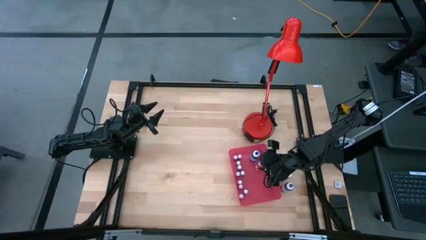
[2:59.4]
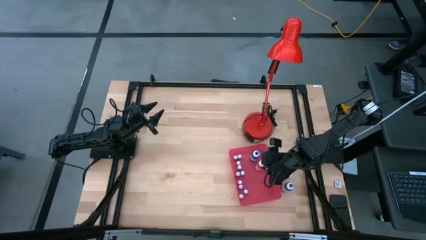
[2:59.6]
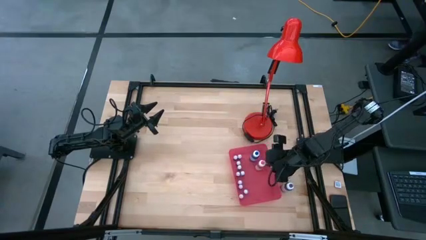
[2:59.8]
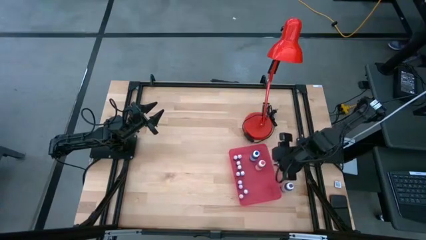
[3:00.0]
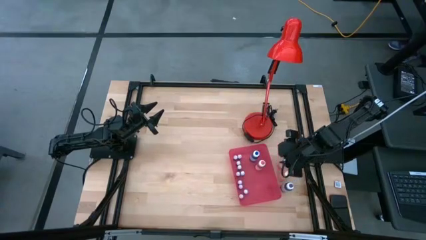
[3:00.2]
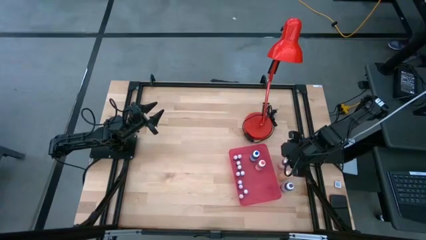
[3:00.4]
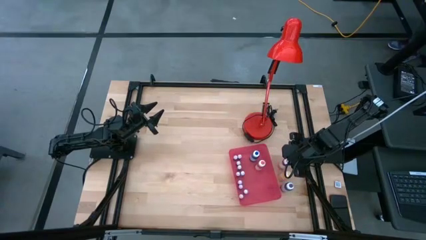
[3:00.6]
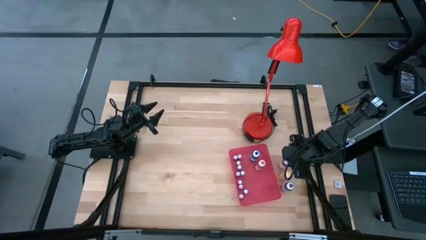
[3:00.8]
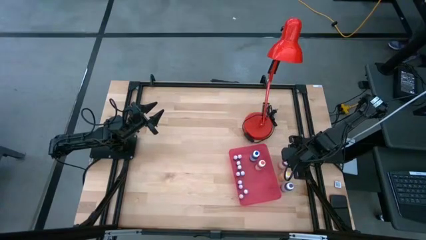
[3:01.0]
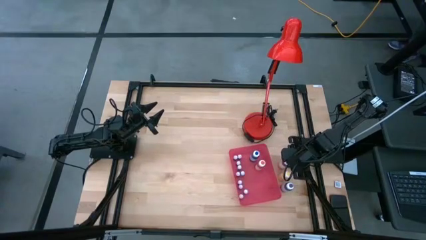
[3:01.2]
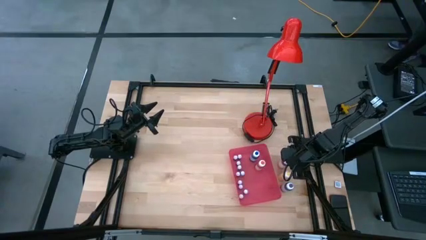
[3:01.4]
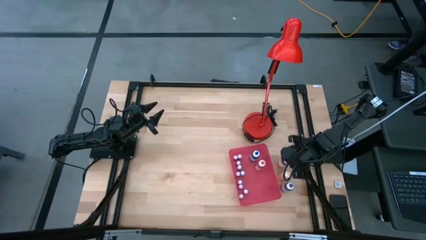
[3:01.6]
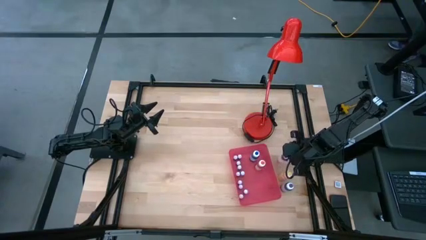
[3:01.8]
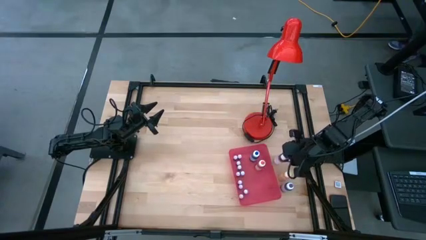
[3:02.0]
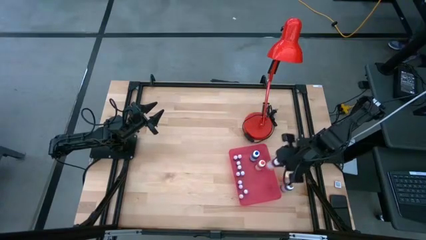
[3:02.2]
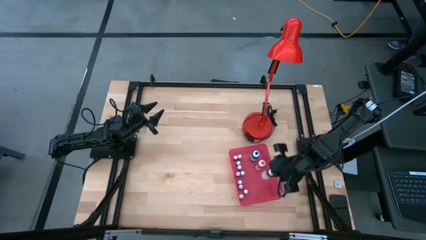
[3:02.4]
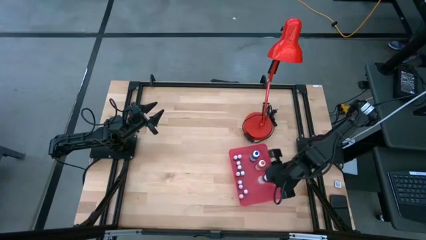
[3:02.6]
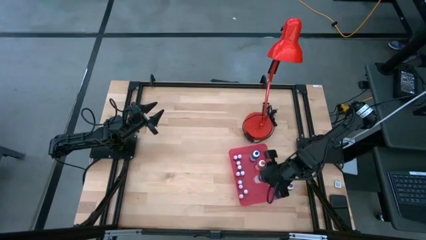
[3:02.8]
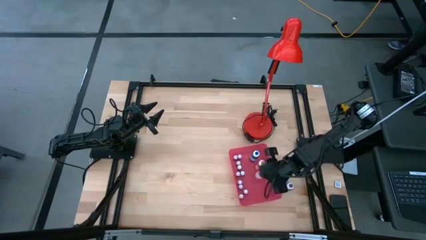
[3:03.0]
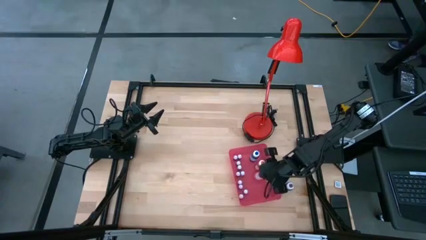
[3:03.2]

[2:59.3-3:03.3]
Task: Pick & Place food coloring
Put the large pink food coloring bottle into the red bin

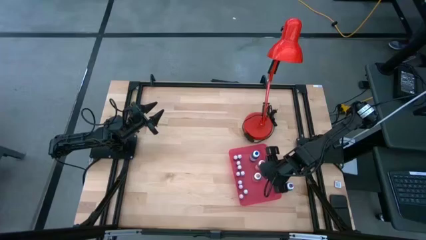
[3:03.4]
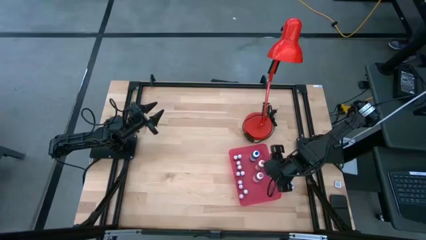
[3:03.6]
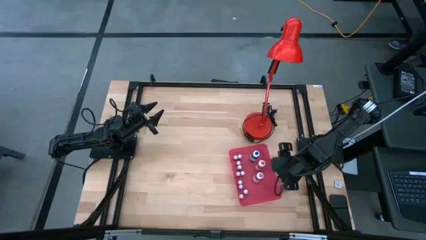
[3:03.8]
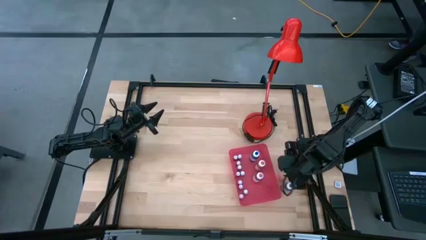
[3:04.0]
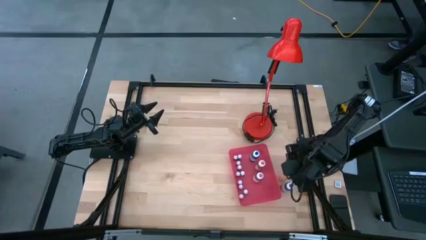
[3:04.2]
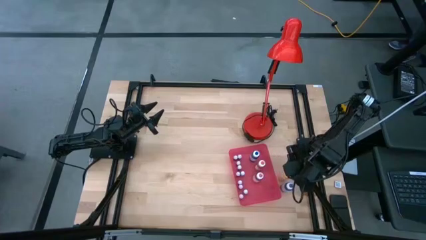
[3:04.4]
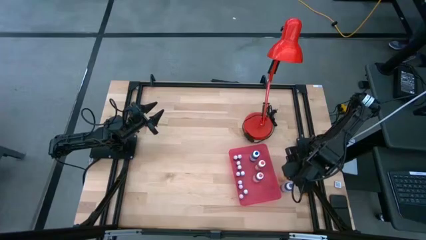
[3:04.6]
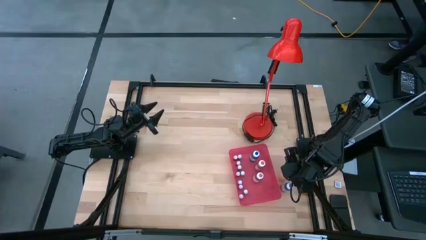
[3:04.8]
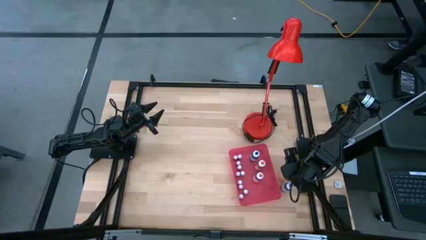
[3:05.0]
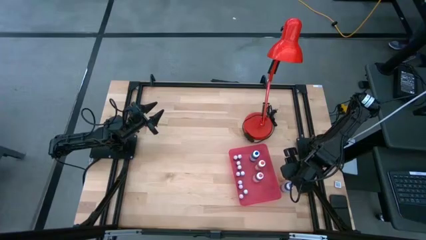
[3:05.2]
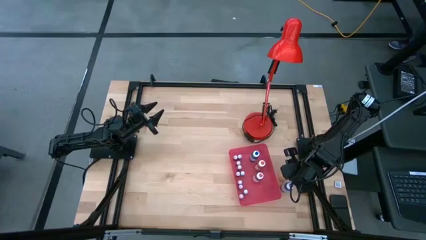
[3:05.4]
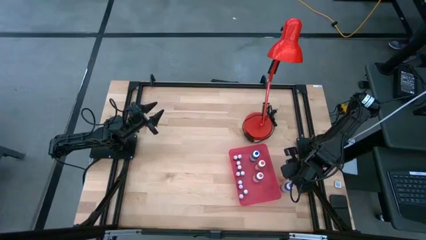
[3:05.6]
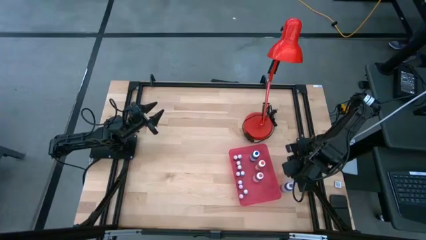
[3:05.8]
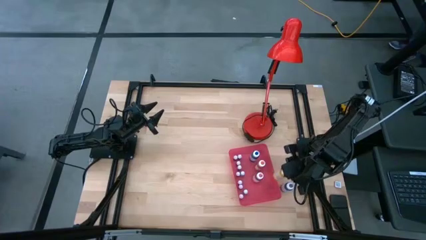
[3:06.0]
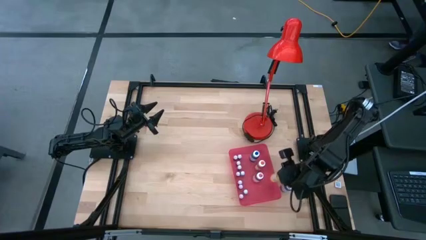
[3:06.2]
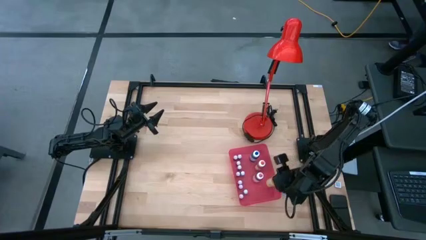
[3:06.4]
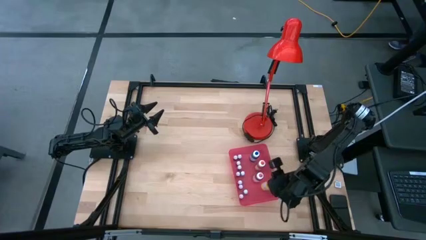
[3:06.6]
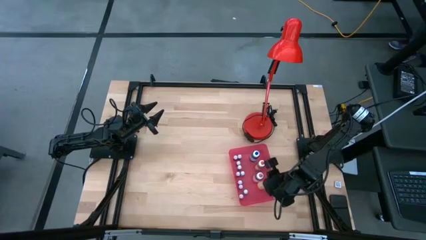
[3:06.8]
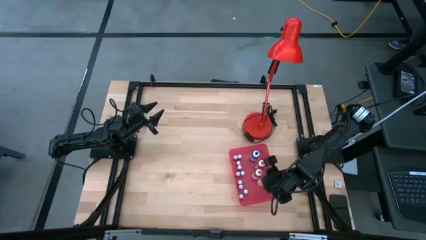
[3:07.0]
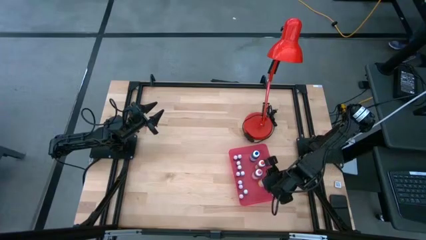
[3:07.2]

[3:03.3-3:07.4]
Put the large yellow food coloring bottle into the red bin

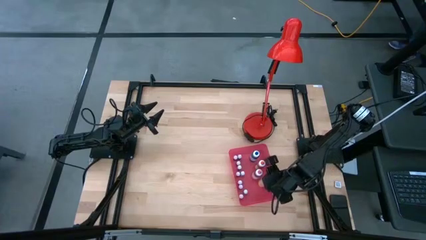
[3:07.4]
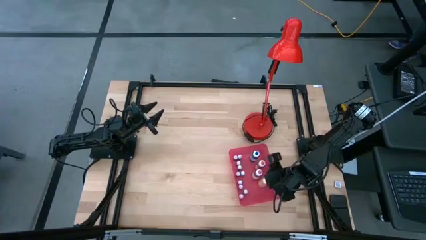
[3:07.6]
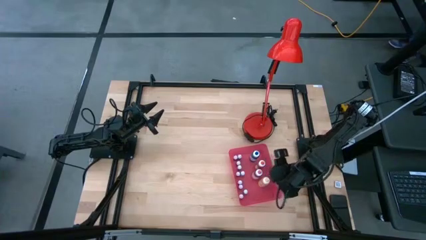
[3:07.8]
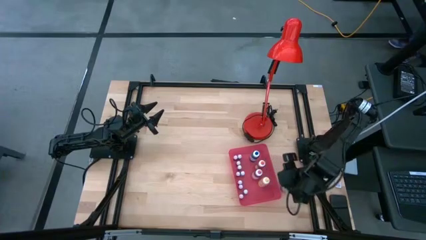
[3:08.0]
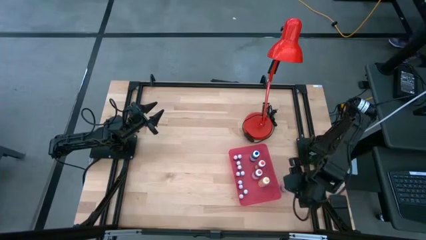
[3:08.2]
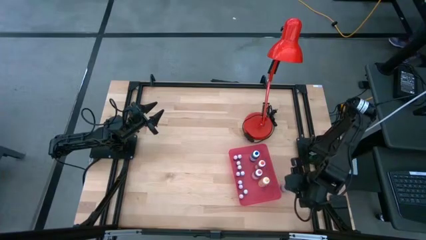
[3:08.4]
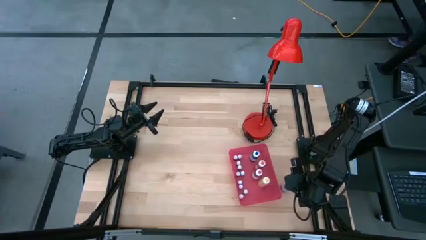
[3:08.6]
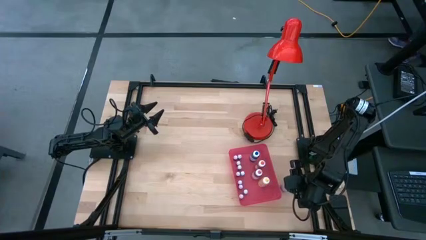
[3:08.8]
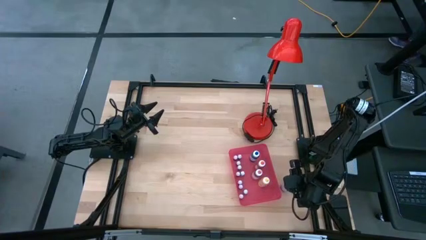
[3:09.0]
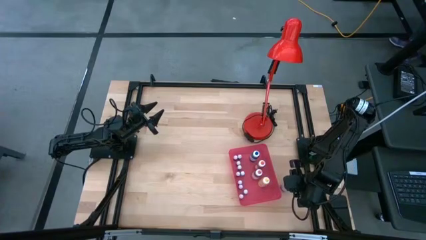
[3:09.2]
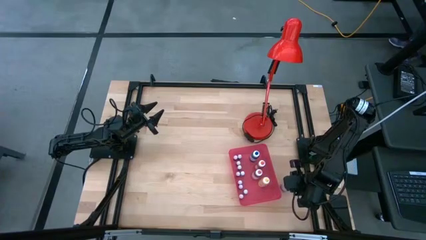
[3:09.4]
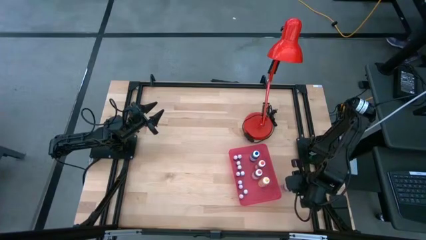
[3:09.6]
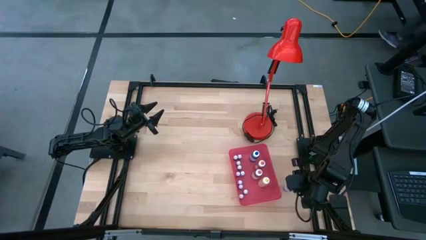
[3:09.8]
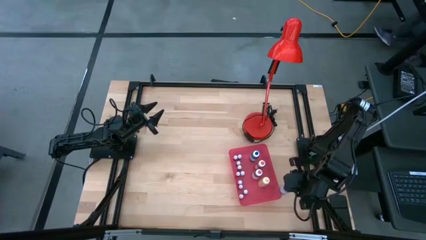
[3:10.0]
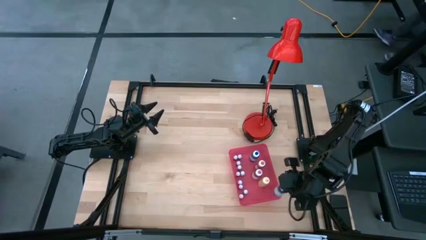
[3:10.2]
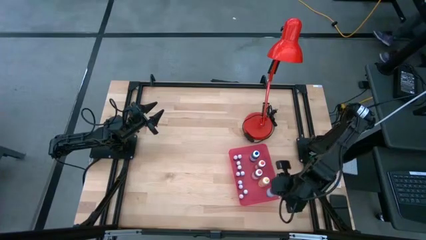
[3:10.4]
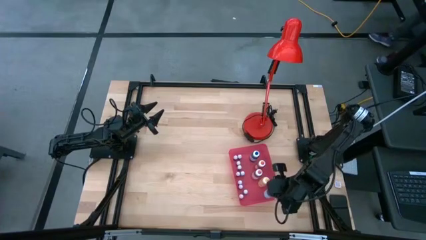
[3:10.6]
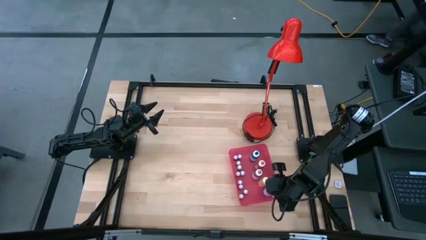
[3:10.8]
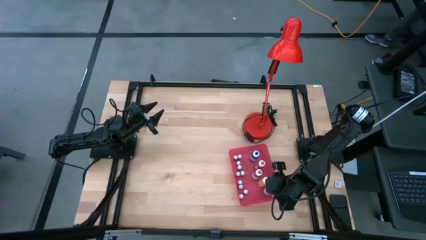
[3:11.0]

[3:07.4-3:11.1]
Put the large purple food coloring bottle into the red bin

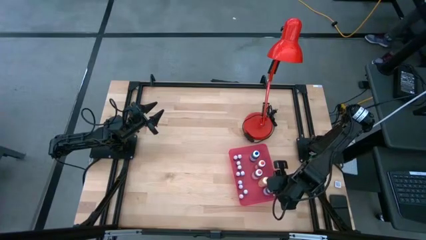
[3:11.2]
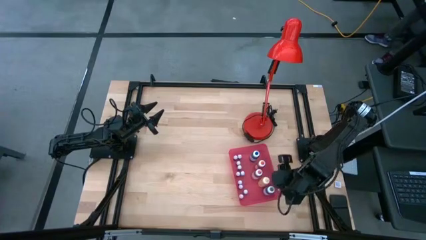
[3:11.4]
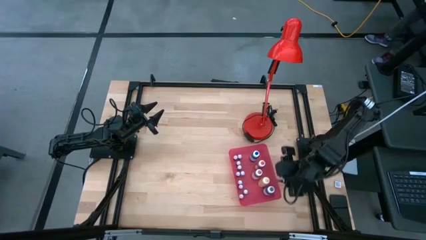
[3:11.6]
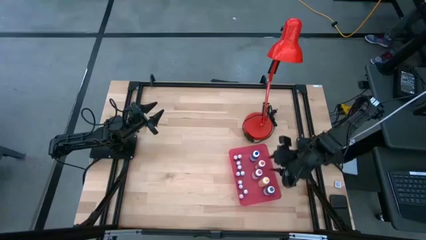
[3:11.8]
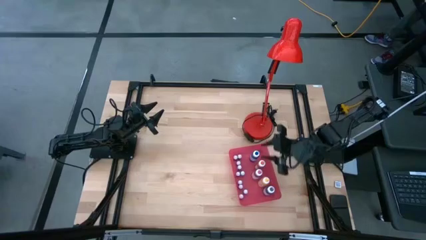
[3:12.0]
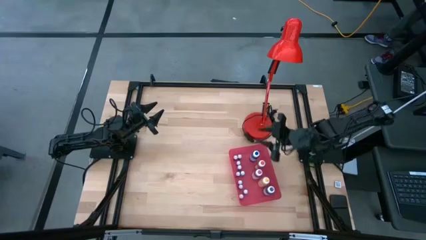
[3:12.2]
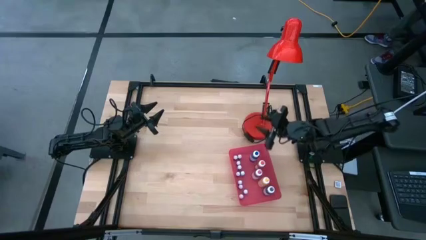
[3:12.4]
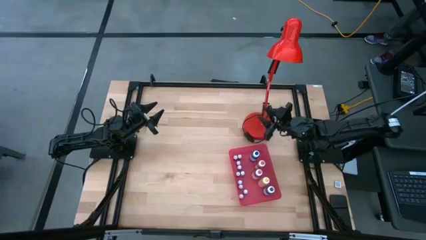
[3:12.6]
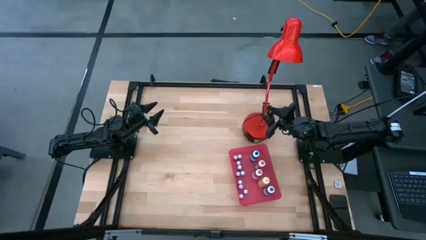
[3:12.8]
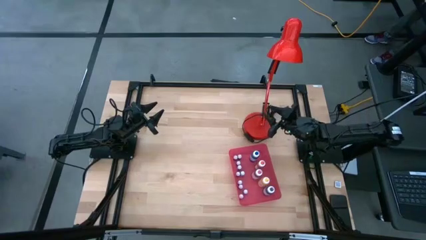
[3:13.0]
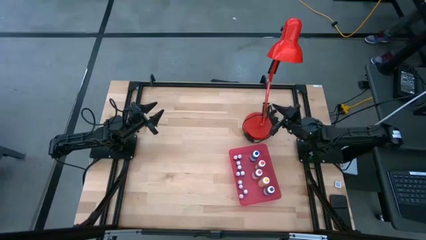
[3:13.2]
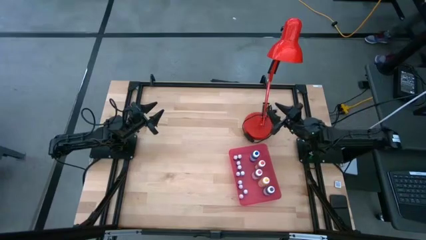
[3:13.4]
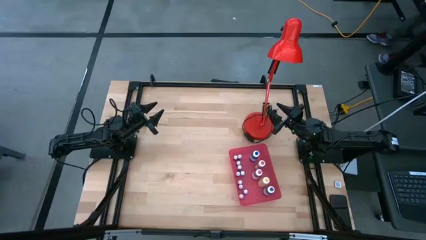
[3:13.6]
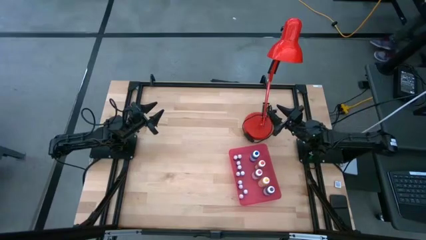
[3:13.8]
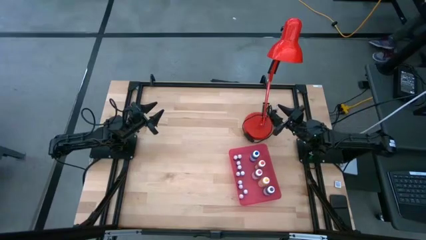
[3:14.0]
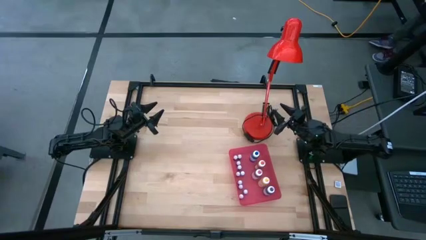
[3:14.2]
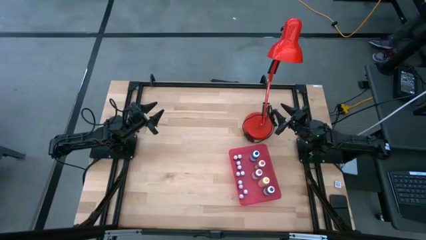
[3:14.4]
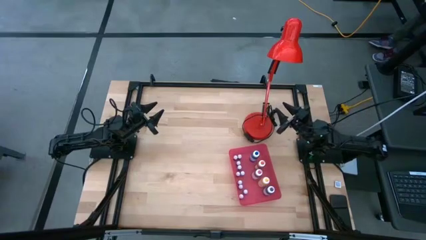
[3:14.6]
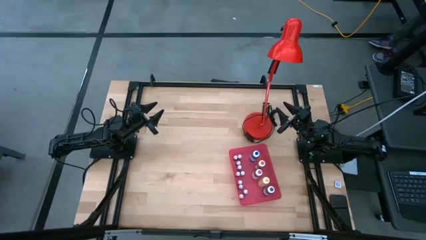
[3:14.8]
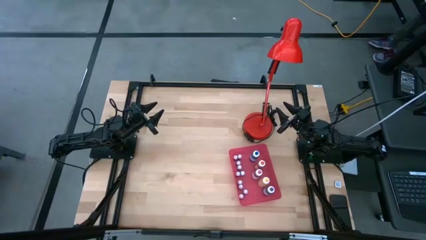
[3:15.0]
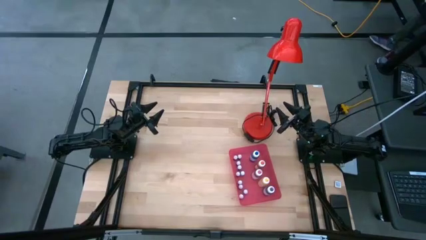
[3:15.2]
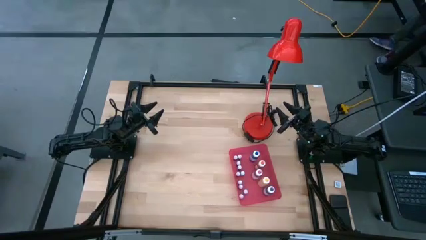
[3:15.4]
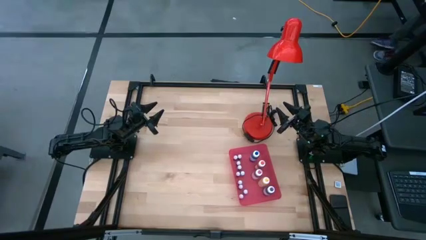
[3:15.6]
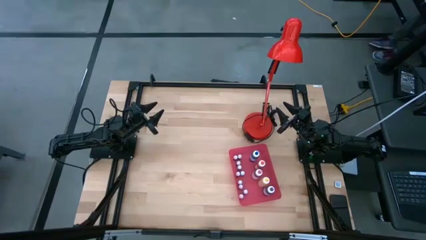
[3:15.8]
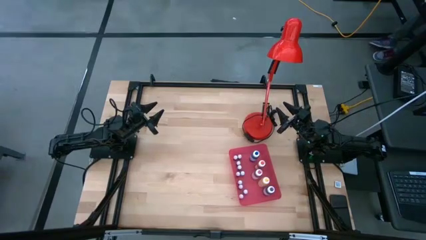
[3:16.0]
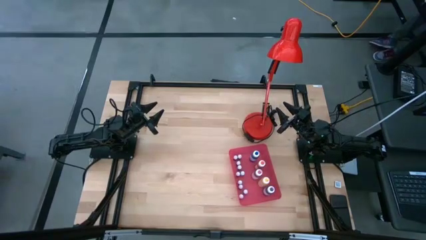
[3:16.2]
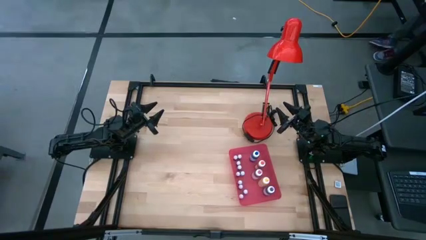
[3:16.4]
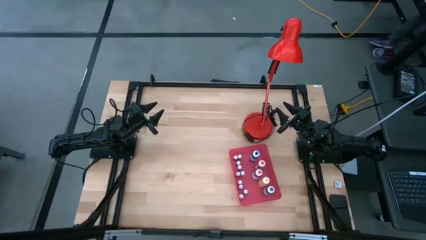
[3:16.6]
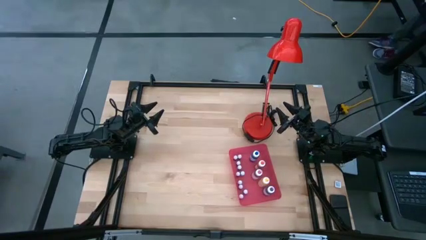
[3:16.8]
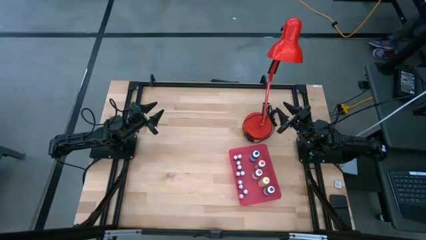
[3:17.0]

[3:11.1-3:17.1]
Return to Home Position
